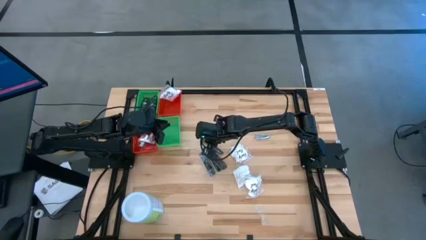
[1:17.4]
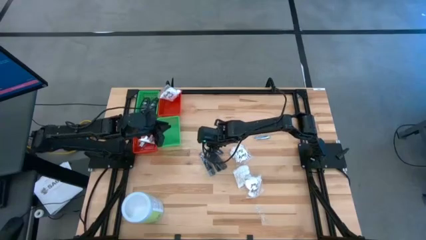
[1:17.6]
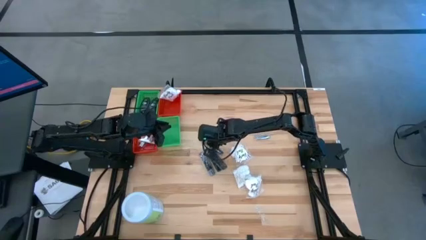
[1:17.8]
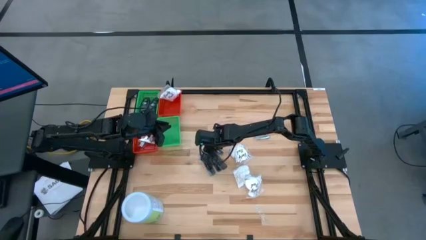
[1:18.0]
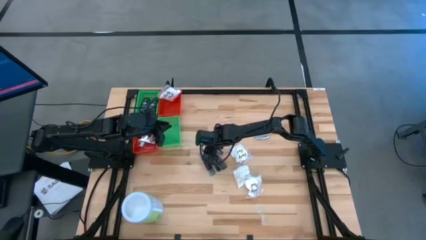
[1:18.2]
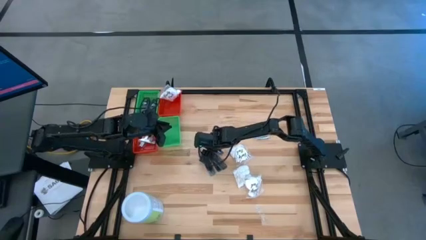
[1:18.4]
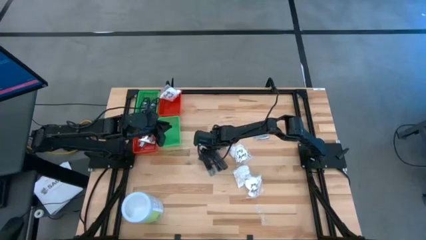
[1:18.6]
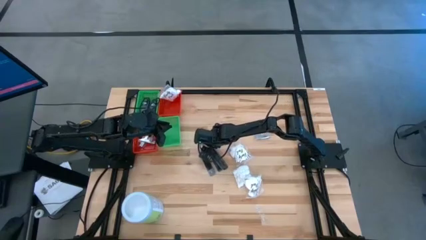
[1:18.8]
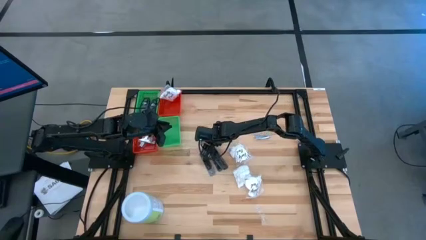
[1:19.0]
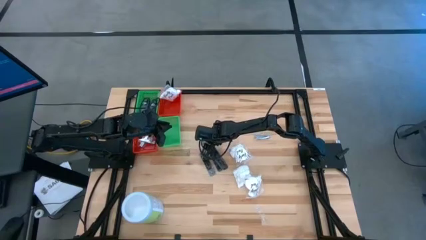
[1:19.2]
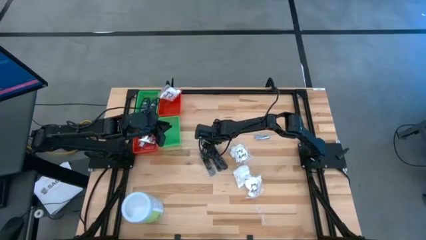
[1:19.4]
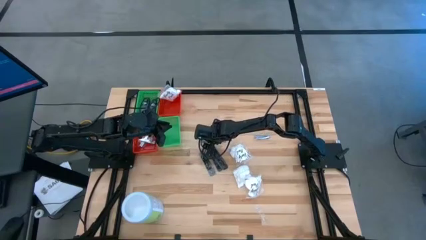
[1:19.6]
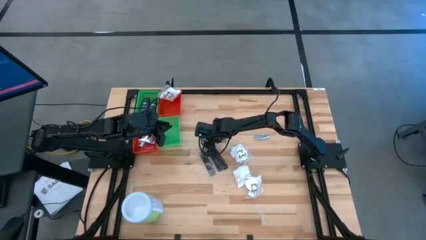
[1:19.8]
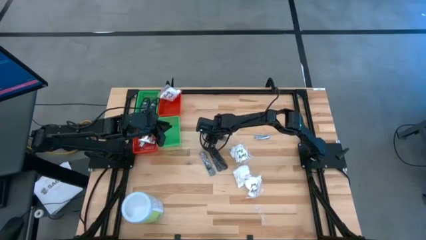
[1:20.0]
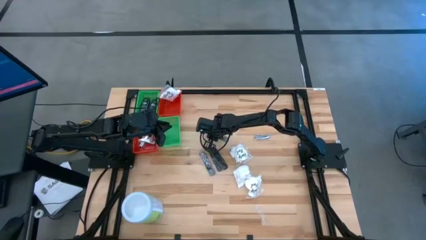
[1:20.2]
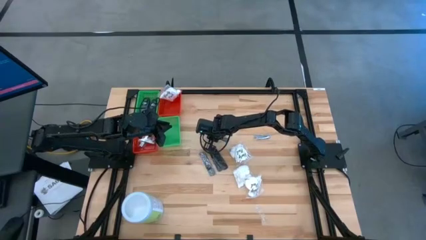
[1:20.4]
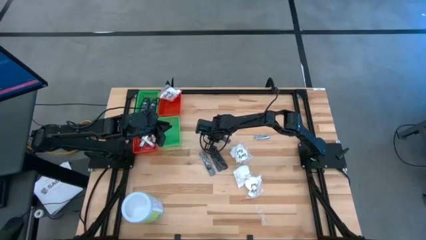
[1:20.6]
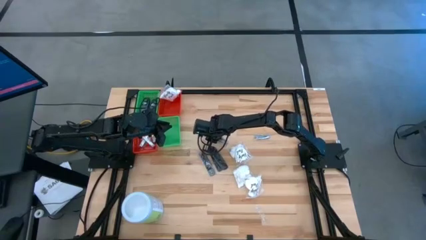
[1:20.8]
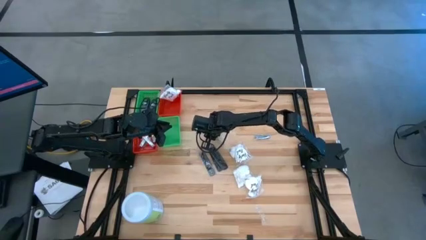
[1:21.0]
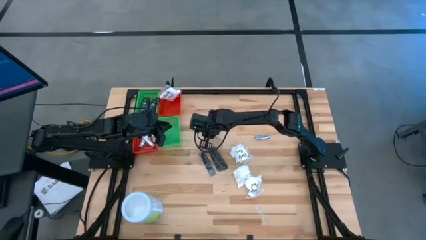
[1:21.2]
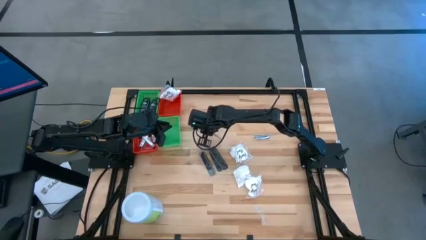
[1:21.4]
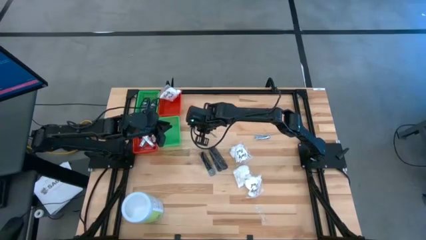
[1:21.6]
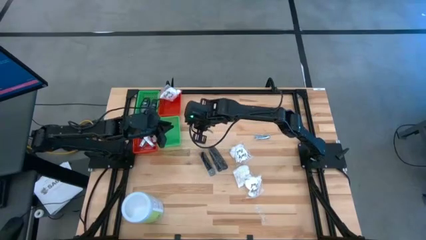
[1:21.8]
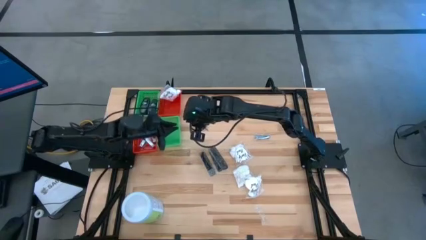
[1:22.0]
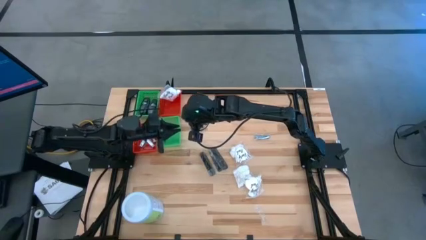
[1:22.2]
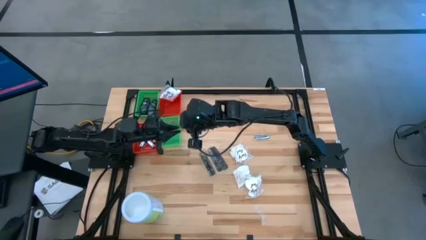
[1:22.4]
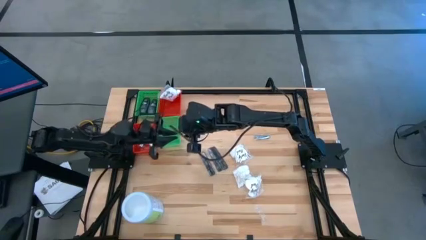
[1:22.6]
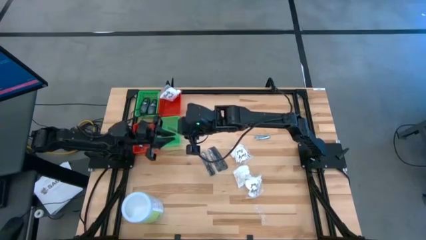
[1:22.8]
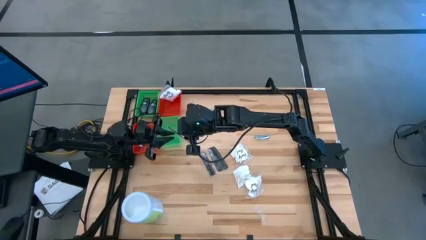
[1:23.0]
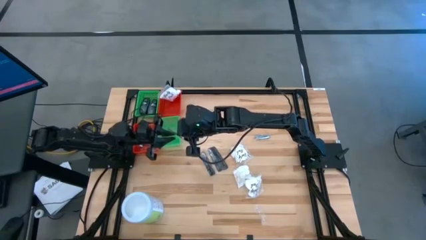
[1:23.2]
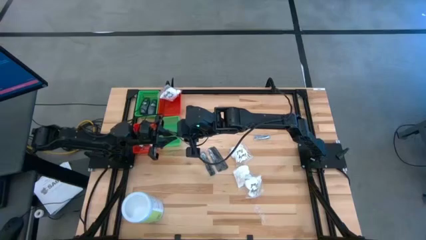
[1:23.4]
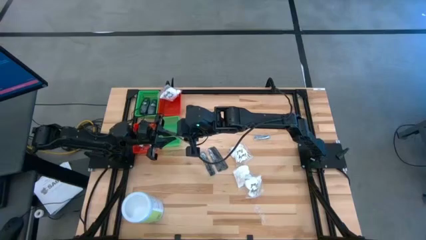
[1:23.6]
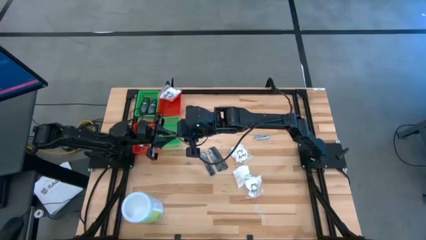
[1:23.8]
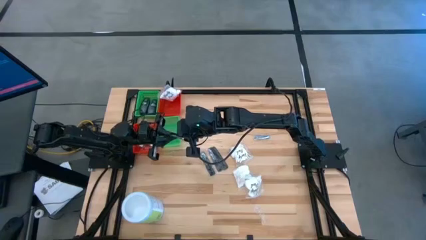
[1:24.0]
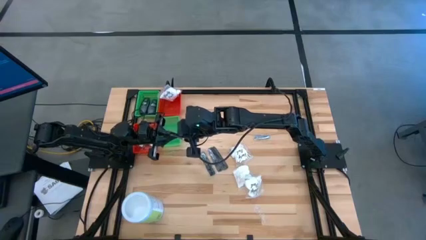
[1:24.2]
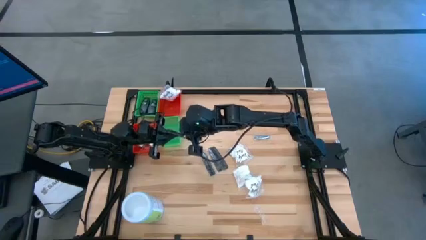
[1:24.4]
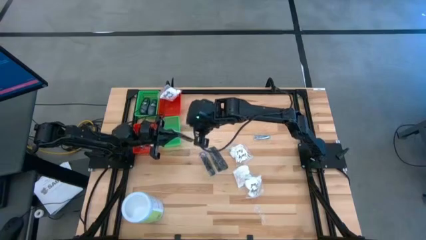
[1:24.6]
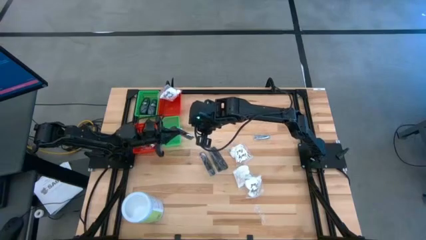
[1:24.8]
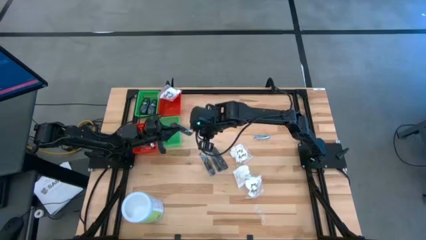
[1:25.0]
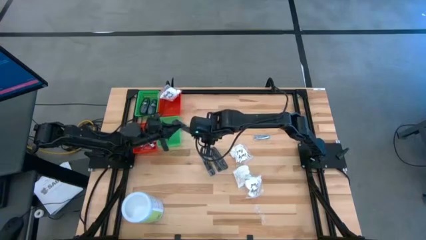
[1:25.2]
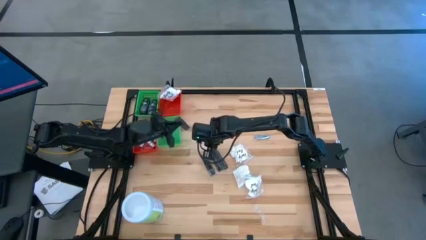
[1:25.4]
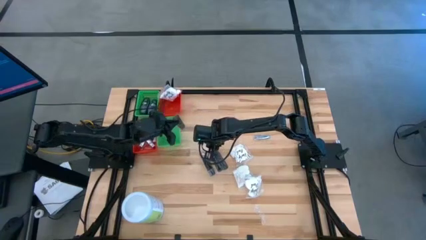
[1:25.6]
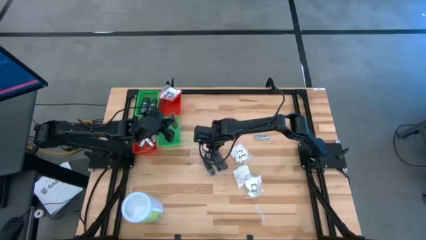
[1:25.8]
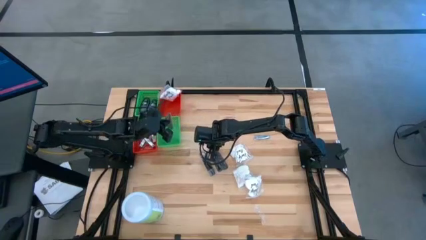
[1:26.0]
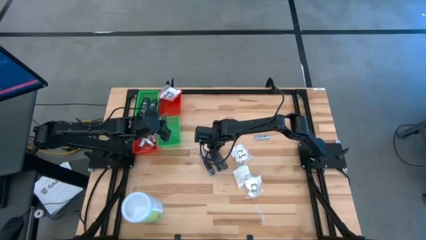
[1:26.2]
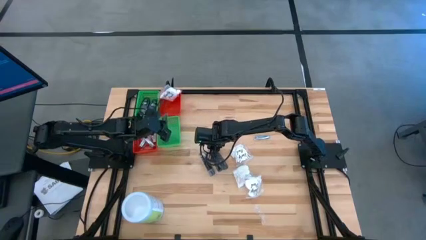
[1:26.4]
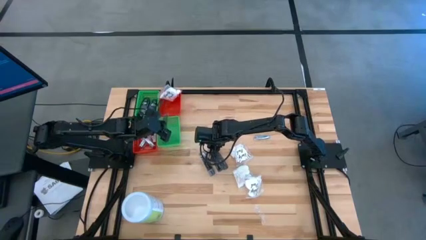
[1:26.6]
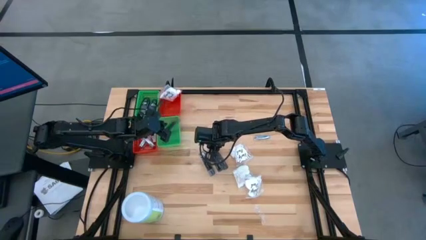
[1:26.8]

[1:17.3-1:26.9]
Task: Pick & Place Travel size toiletries
Put the black comb into the bottom green bin

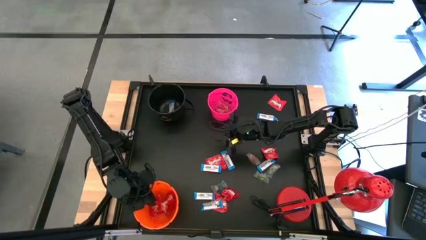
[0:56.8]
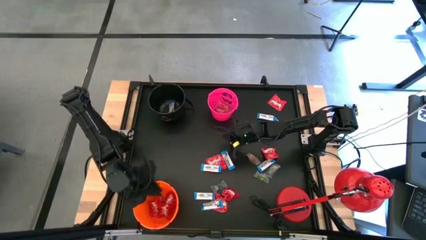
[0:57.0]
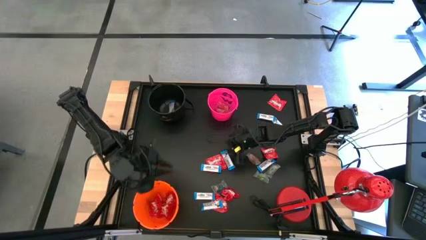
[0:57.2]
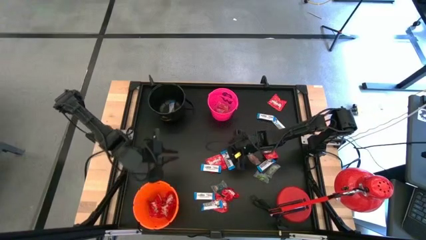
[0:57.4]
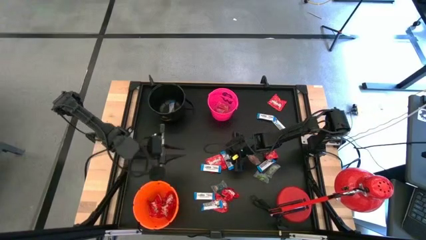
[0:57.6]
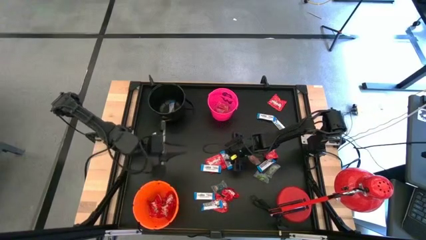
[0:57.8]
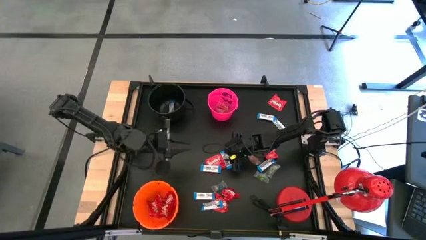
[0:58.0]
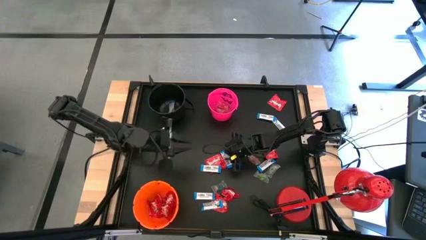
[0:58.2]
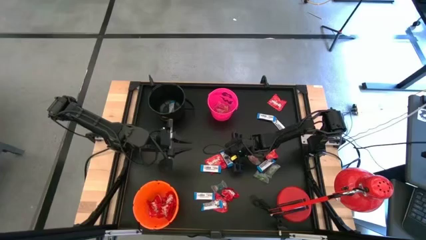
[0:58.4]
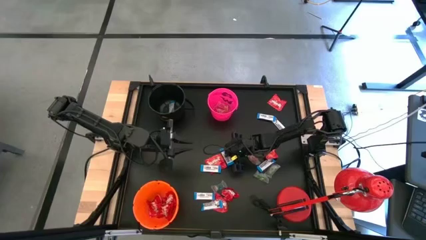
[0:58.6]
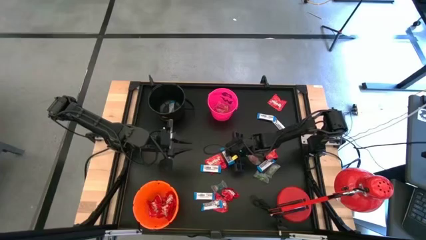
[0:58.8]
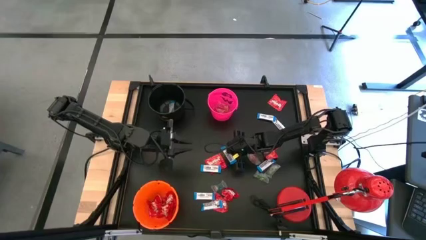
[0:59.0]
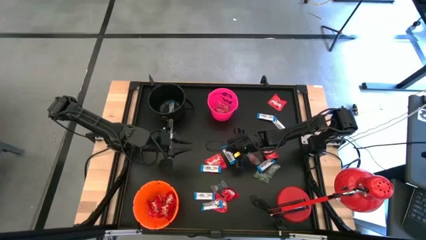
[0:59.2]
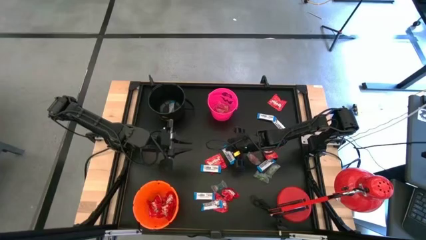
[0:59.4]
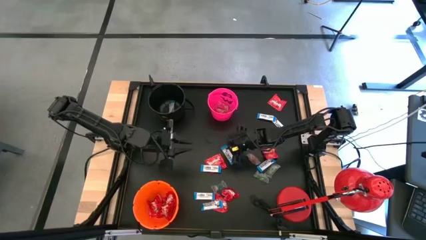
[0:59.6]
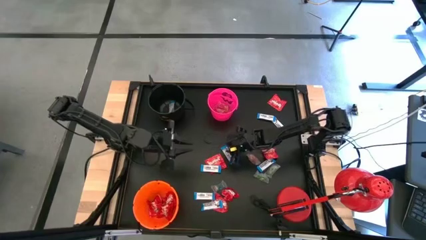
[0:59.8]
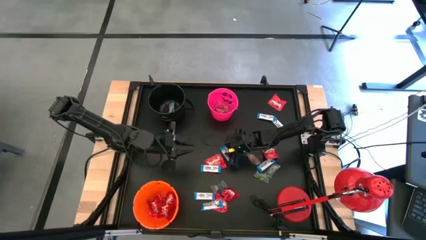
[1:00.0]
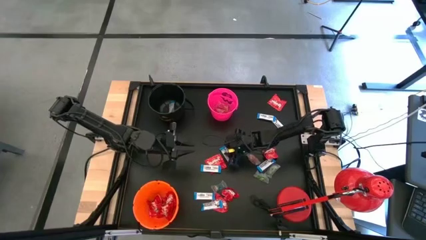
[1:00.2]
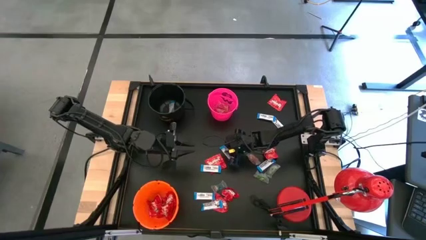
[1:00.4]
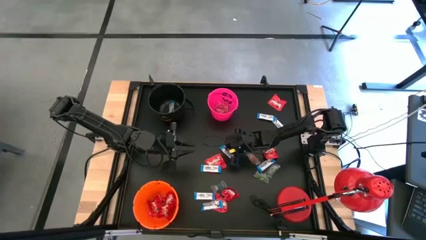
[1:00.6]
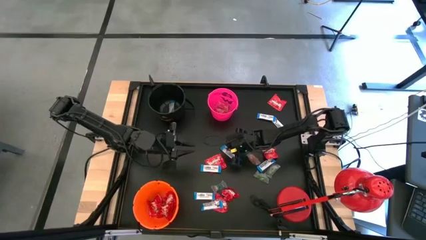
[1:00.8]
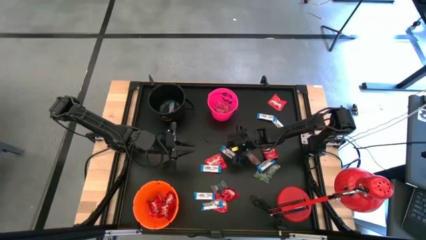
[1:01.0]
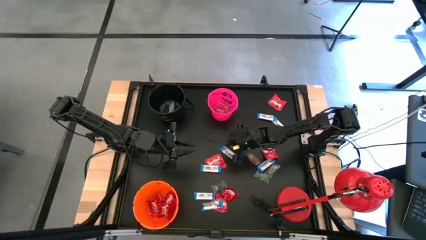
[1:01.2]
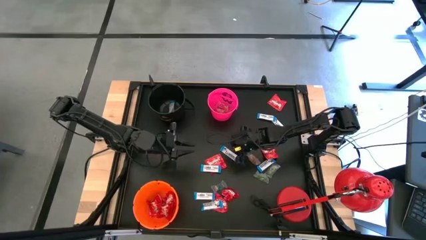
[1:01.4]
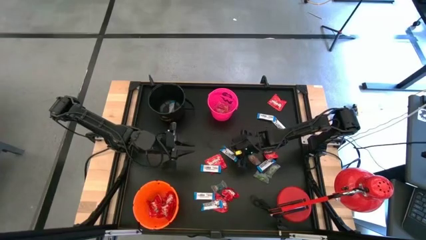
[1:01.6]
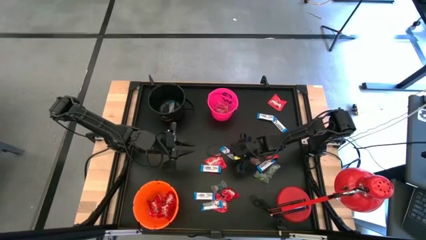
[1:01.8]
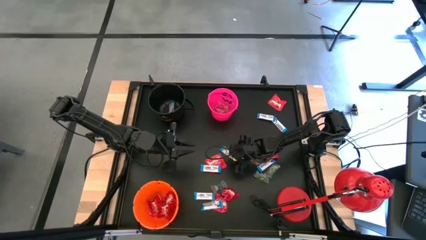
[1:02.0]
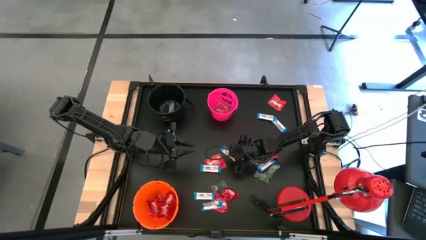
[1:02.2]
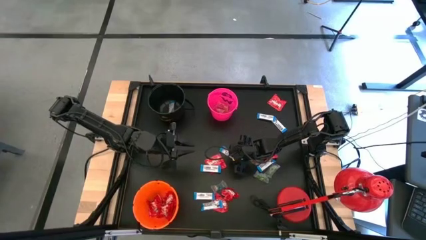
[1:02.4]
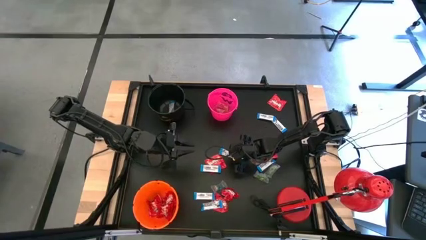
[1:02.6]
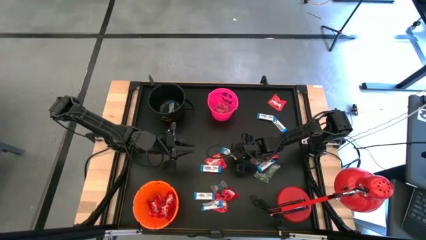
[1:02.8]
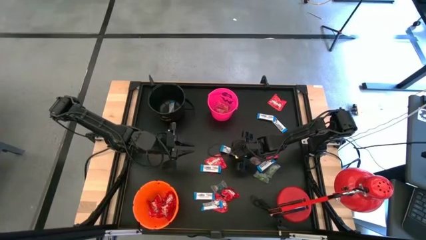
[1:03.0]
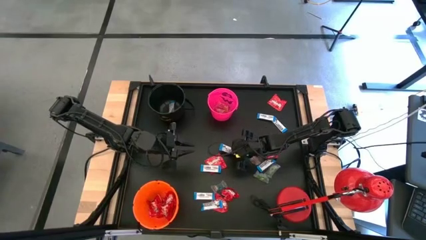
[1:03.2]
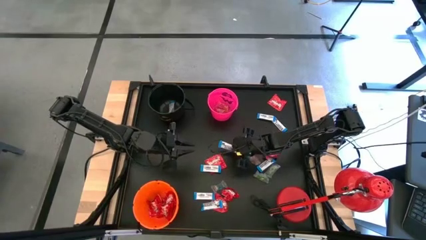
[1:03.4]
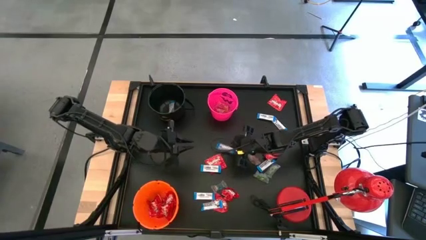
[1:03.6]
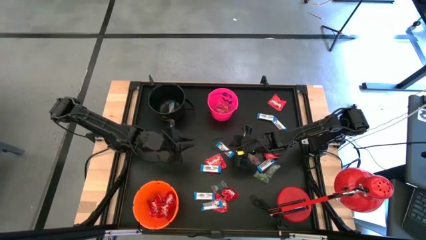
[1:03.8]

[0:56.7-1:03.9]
Task: Organize candy in baskets
Put the white chocolate bar into the black bucket
